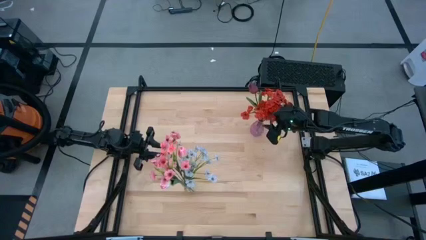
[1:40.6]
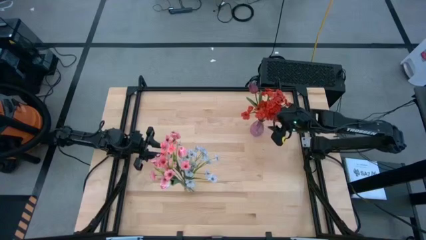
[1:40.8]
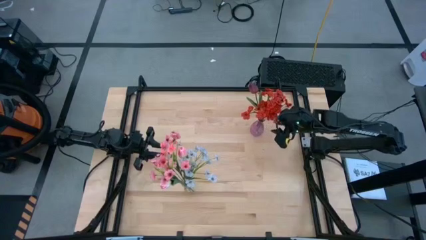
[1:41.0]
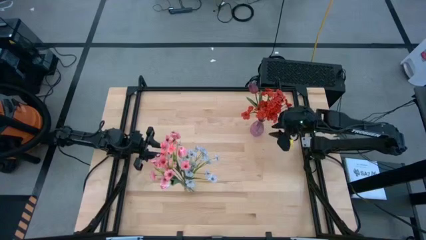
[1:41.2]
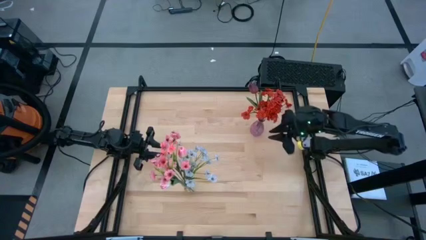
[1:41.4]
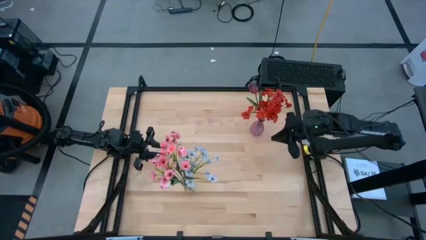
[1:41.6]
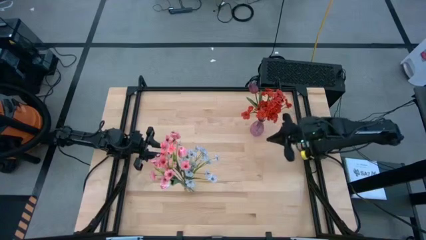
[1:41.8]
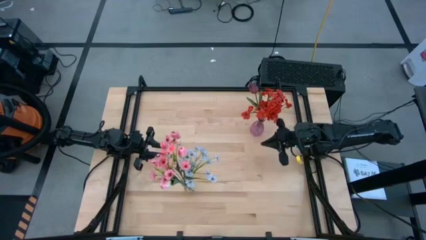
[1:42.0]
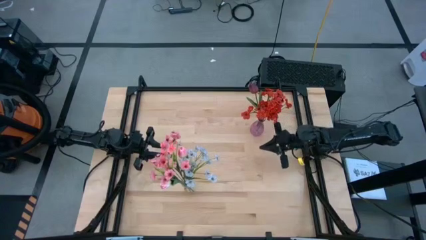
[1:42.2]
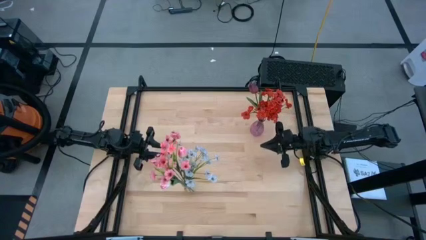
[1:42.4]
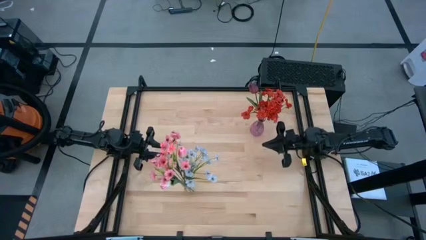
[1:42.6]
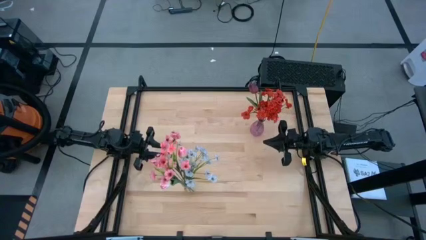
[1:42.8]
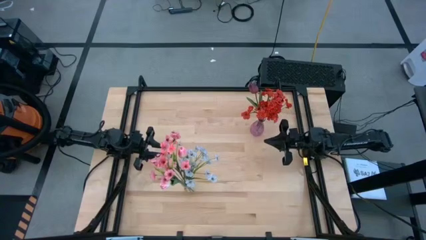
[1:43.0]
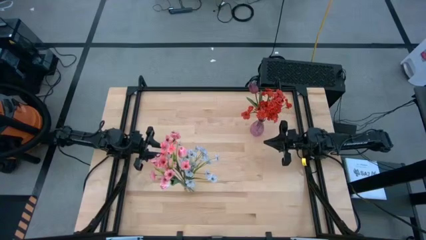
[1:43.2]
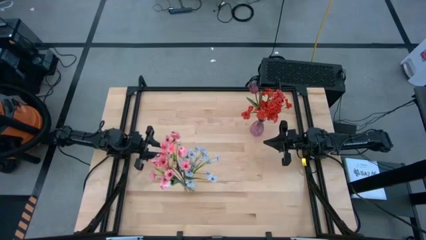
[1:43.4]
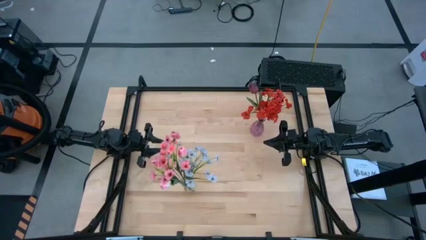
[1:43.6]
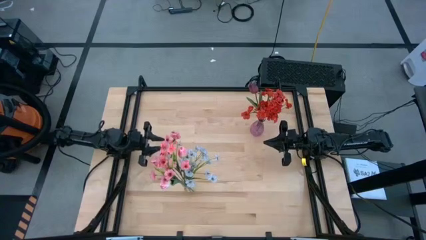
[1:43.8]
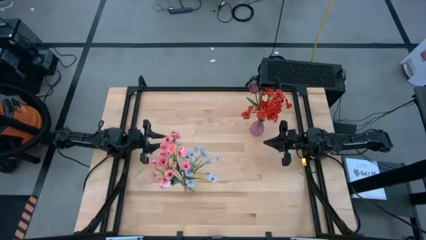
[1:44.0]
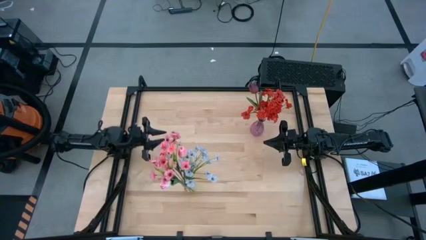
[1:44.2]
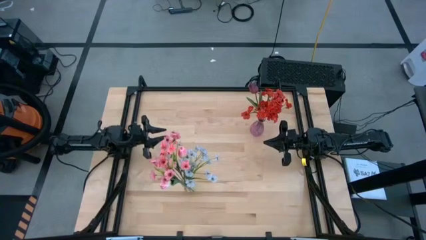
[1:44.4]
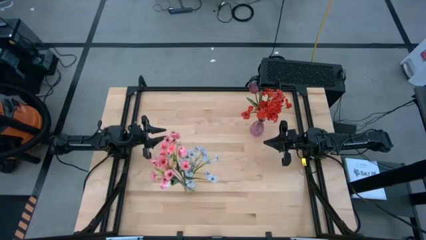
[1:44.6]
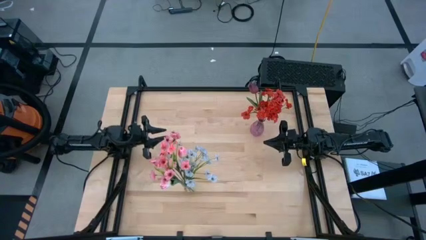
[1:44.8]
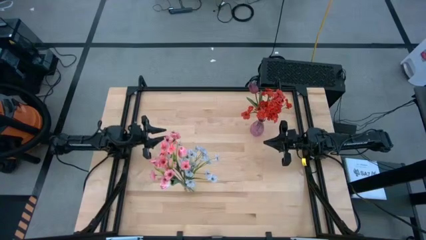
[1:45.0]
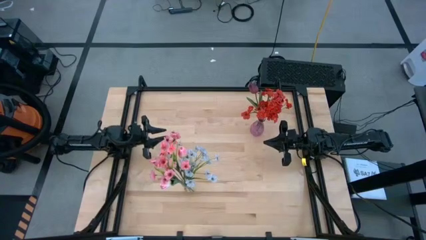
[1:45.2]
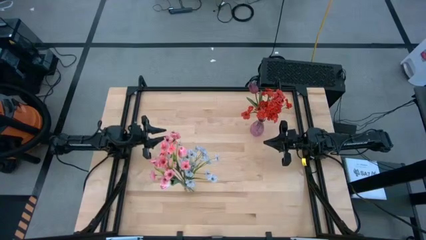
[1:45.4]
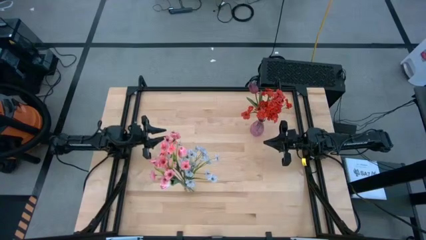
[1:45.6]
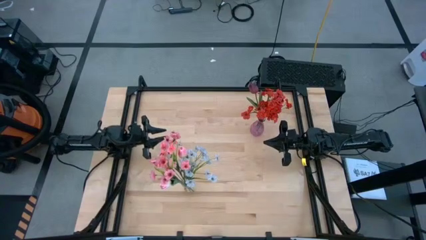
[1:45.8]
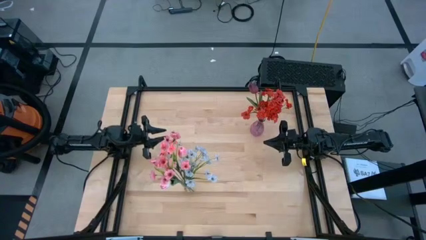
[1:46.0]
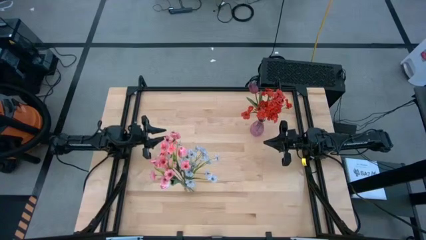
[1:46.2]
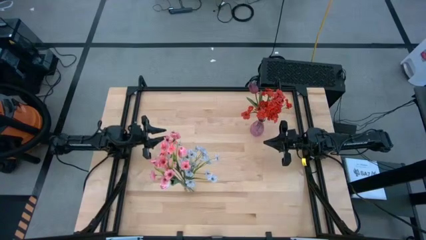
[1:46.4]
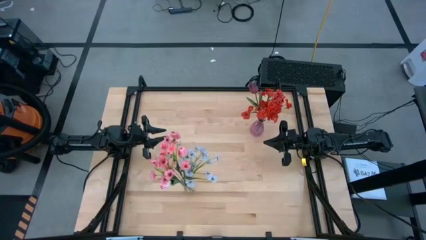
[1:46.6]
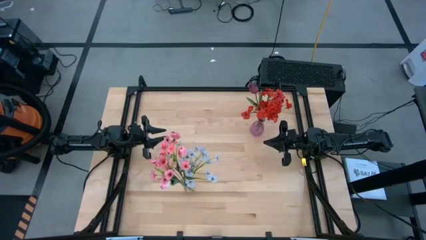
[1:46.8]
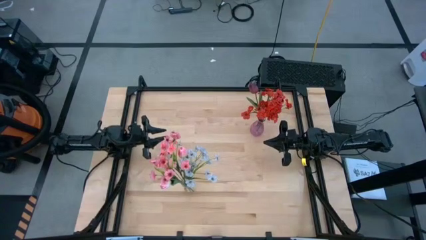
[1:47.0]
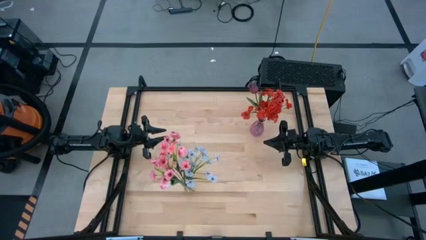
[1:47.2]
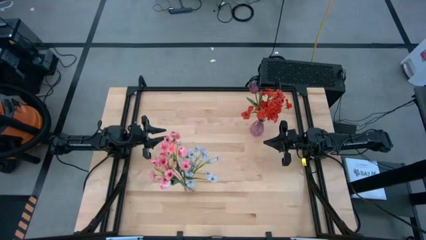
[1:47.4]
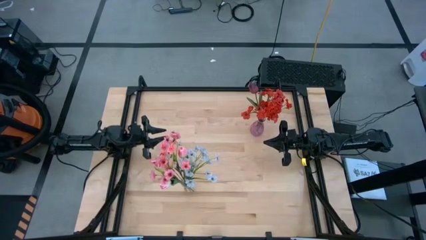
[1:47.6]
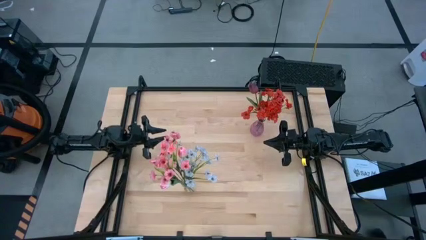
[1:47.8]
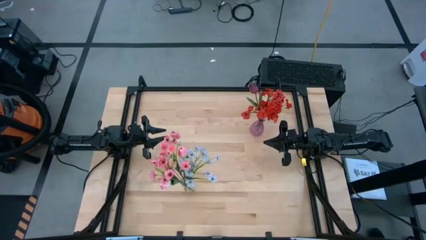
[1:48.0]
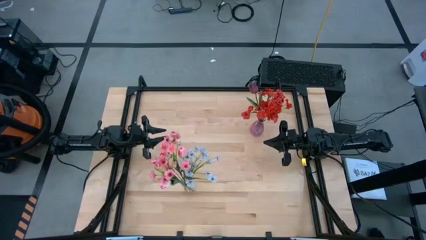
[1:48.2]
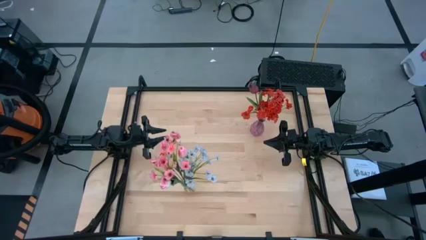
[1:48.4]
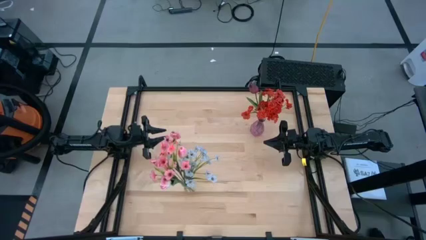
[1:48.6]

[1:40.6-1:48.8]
Task: Sort flowers into vase by color
Return to Home Position

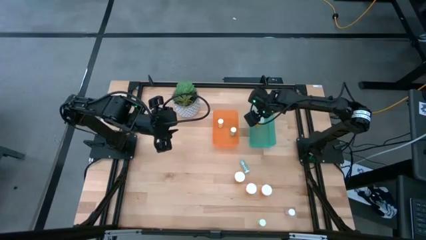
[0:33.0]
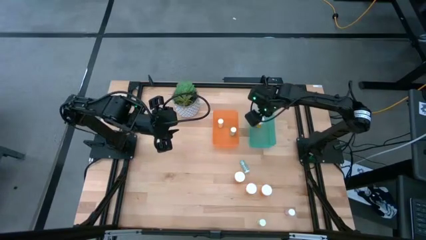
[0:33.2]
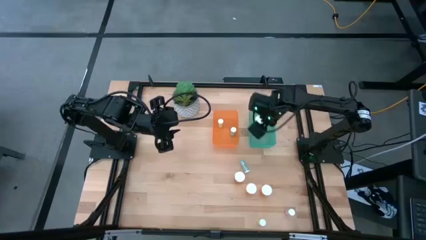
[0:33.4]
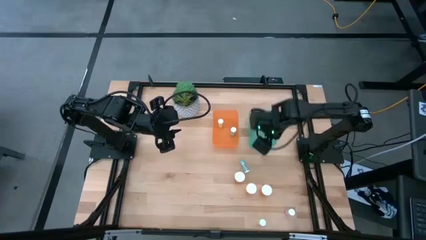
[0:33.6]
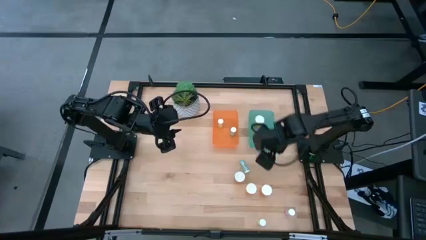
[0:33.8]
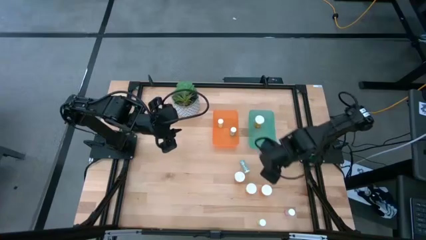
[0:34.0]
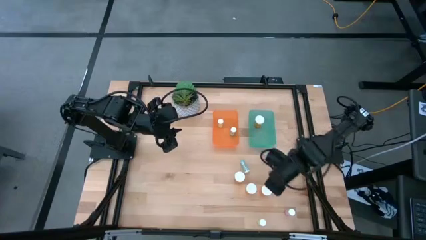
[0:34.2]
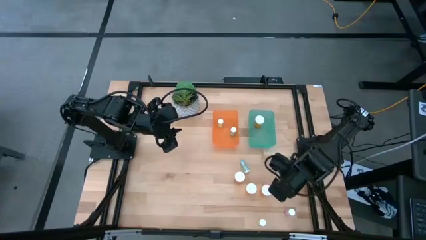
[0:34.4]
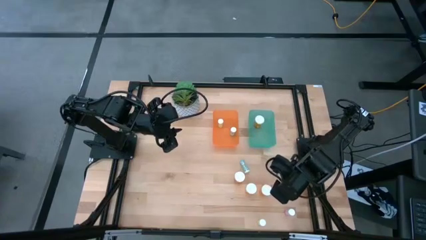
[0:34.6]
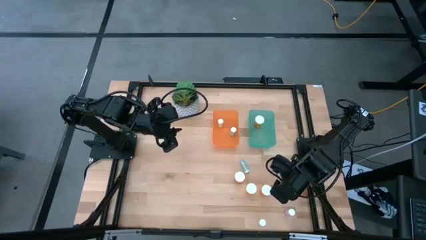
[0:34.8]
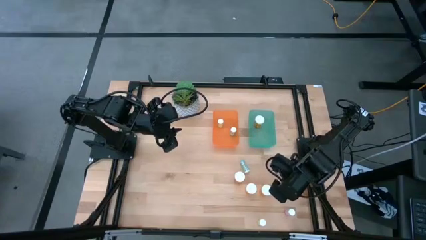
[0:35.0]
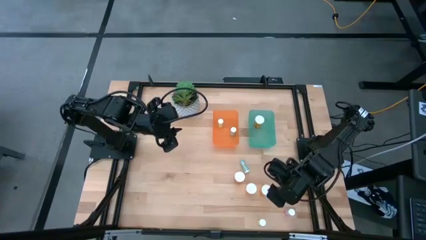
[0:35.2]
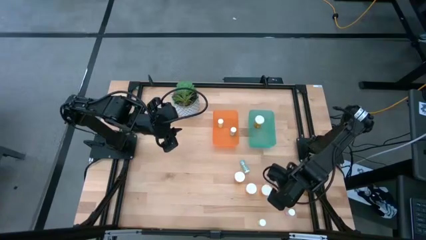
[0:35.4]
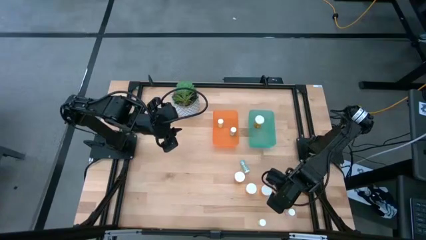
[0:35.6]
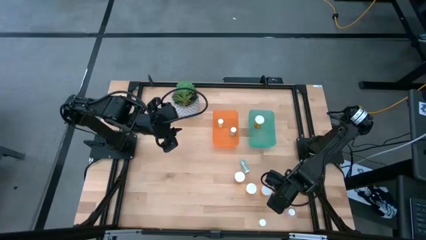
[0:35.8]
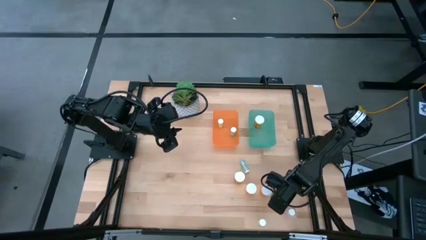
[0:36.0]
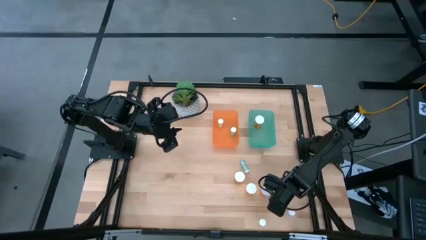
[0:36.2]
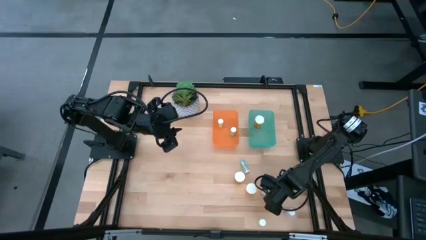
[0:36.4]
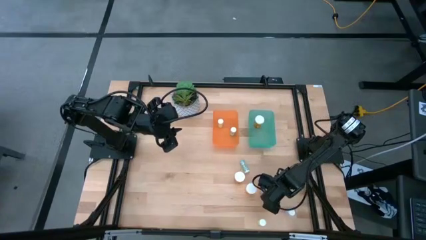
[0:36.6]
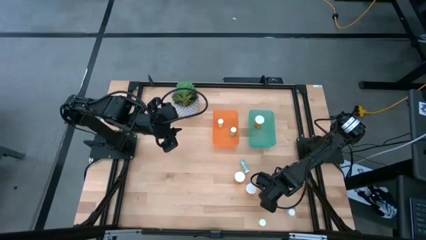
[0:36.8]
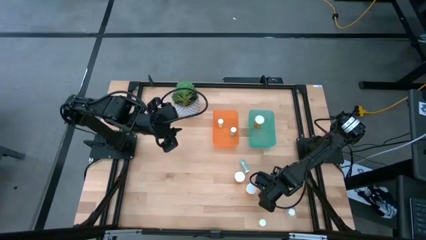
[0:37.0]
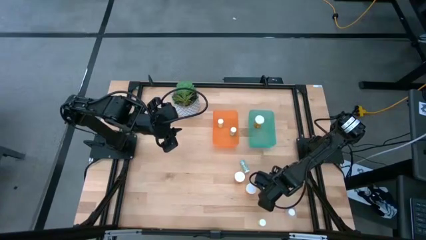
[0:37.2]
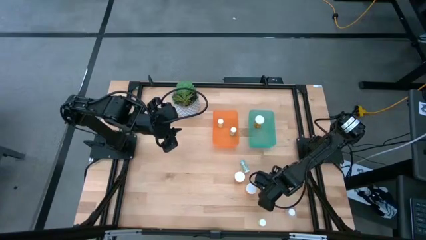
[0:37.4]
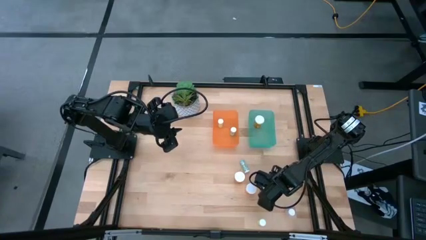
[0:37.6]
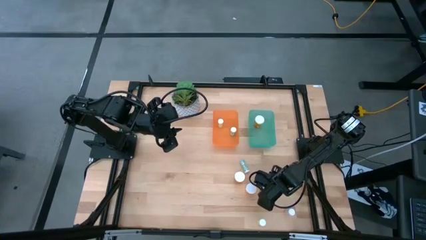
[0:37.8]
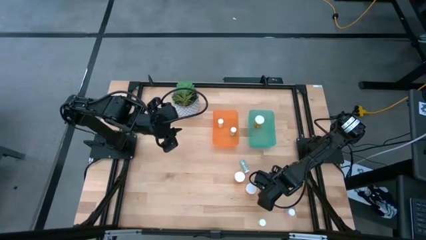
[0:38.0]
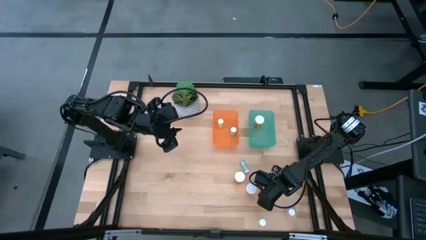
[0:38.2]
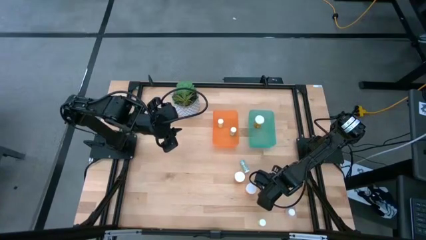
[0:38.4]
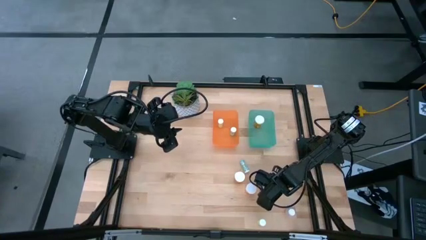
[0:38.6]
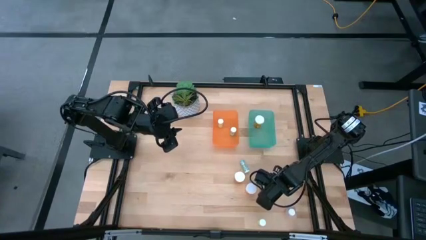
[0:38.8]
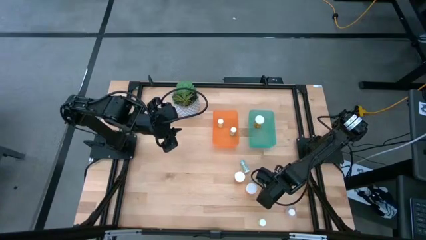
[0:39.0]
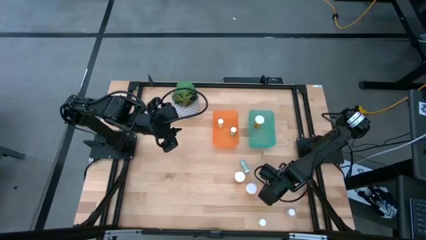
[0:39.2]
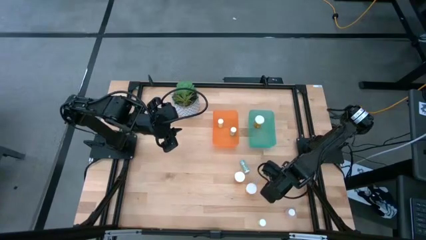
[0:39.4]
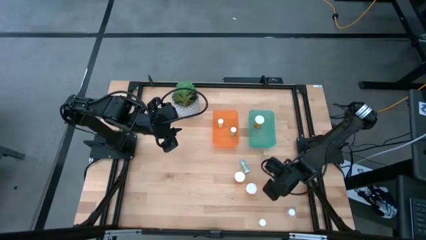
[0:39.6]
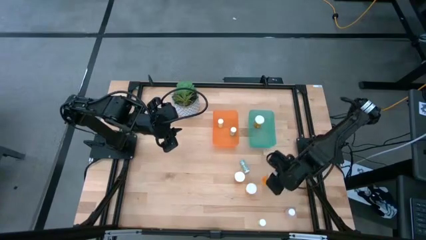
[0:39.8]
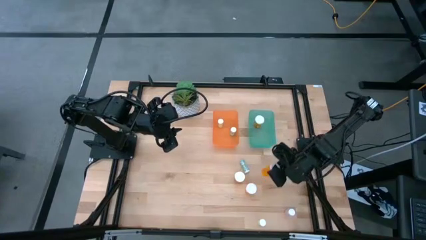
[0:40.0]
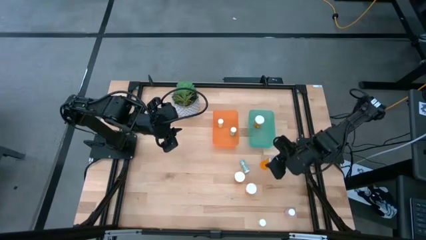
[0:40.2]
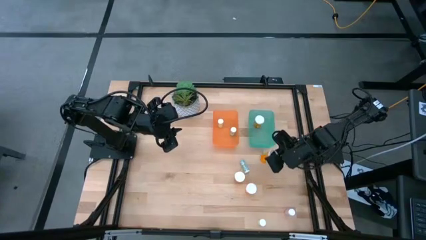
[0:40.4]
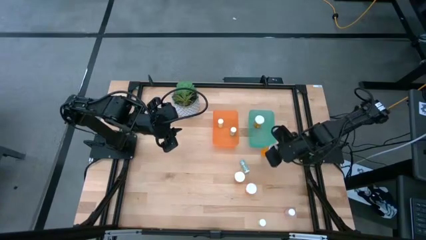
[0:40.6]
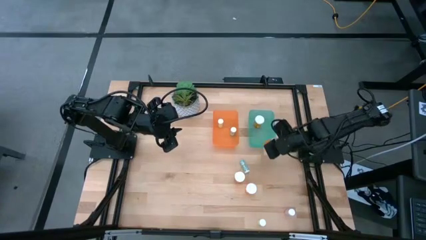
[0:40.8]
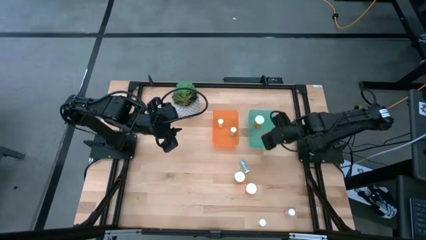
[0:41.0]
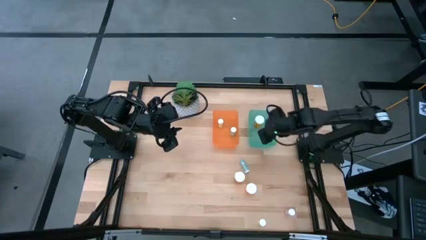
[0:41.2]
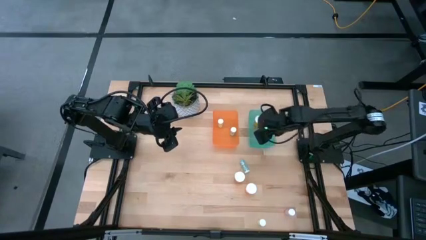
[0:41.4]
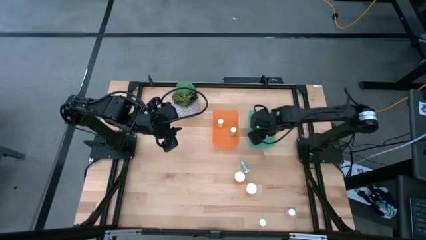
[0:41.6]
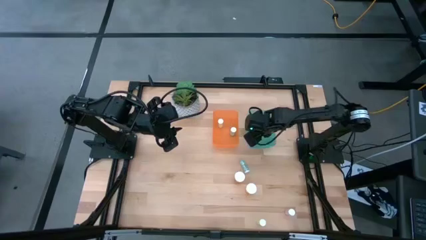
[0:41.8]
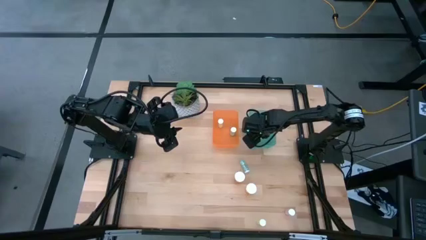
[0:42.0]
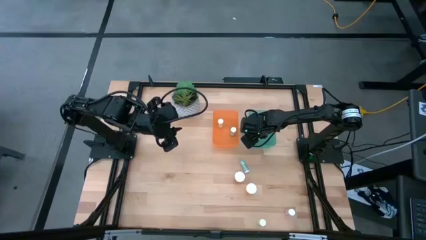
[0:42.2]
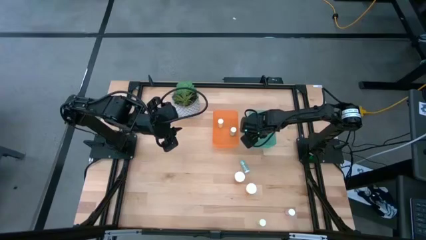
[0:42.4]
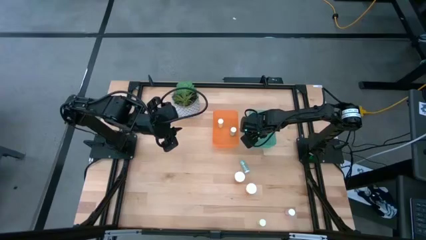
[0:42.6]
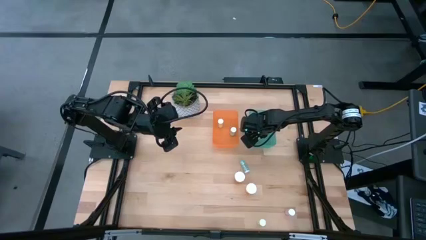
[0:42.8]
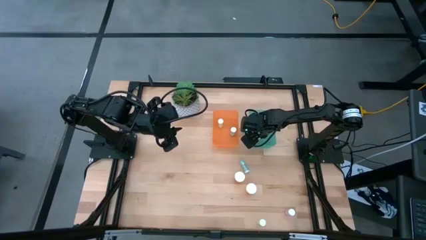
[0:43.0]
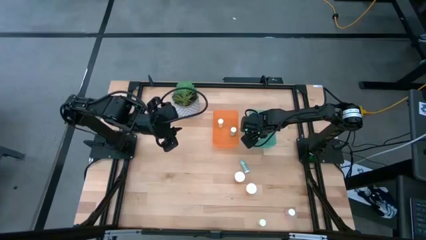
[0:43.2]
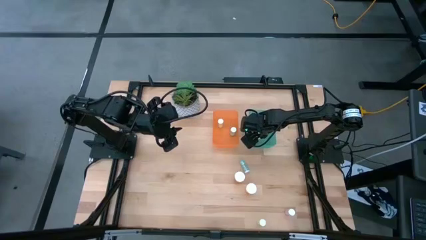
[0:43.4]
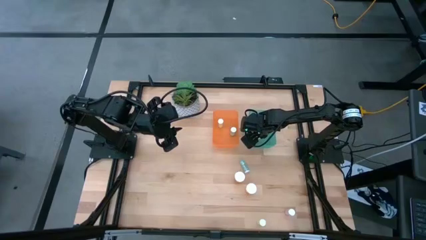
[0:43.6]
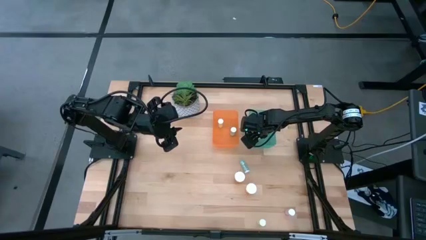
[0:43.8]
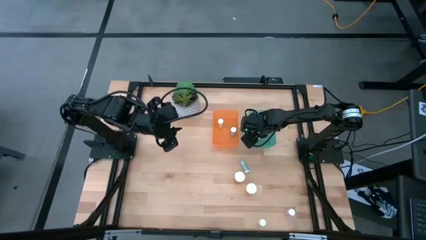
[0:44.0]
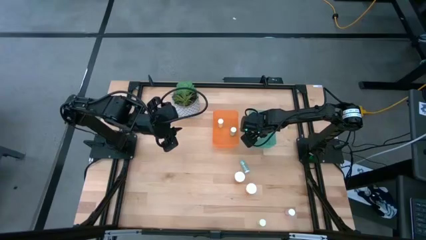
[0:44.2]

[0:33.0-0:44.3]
Task: Pick and place medicine bottles into bin by pill shape (circle, oval)
Put the large orange bottle into the green bin
